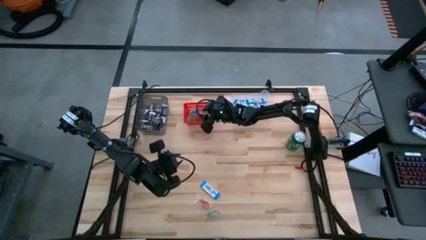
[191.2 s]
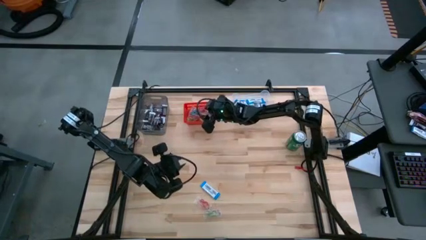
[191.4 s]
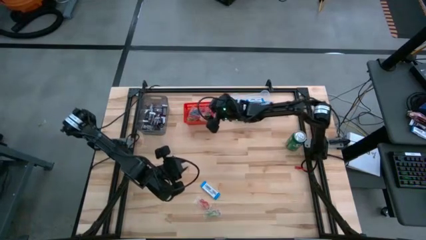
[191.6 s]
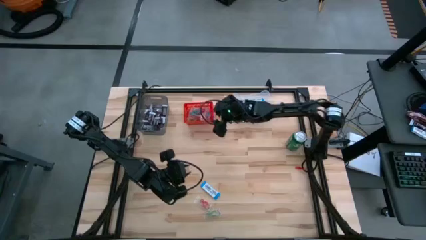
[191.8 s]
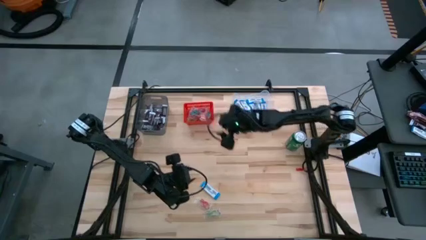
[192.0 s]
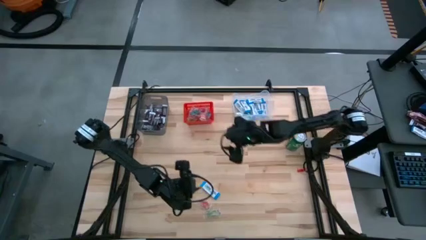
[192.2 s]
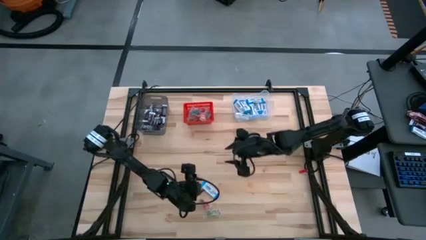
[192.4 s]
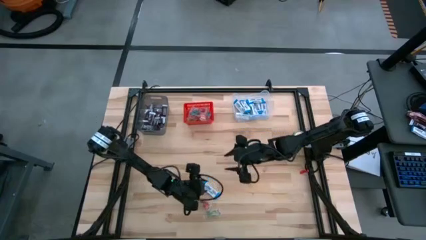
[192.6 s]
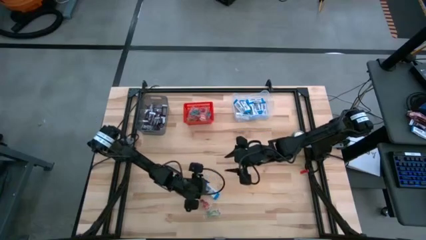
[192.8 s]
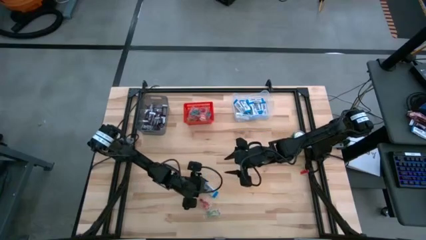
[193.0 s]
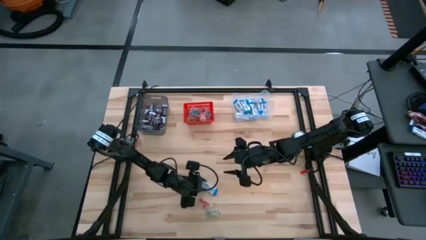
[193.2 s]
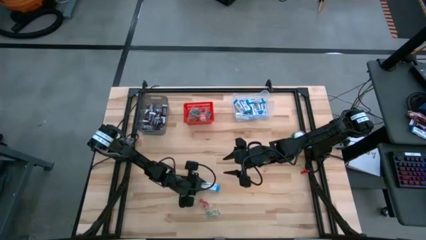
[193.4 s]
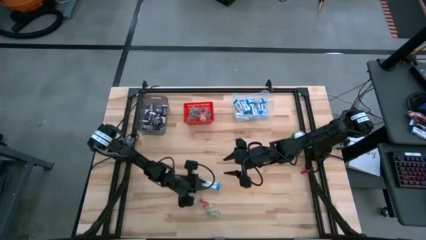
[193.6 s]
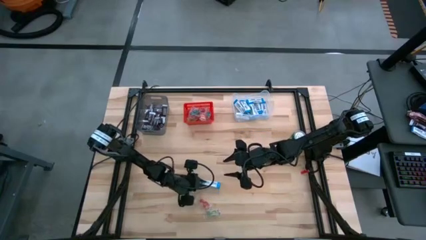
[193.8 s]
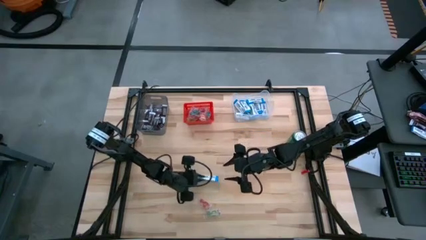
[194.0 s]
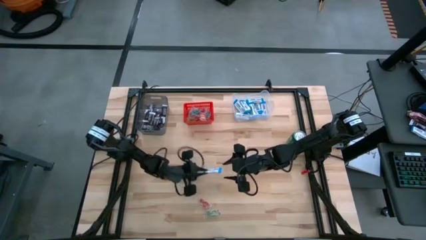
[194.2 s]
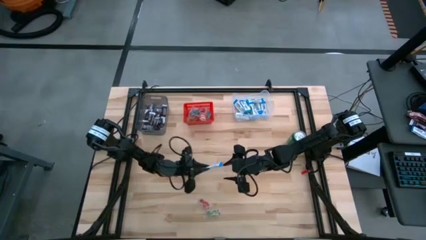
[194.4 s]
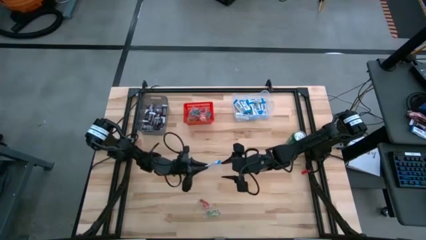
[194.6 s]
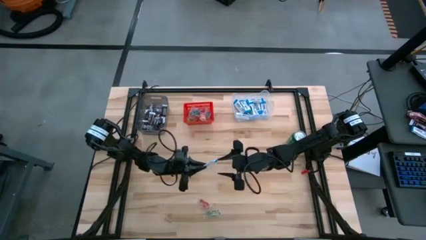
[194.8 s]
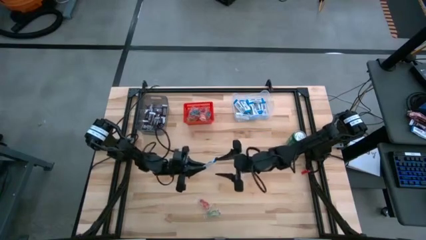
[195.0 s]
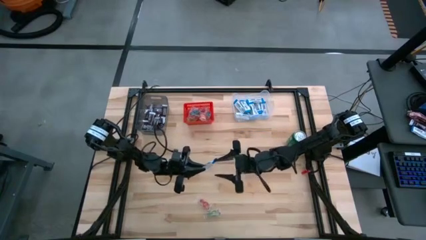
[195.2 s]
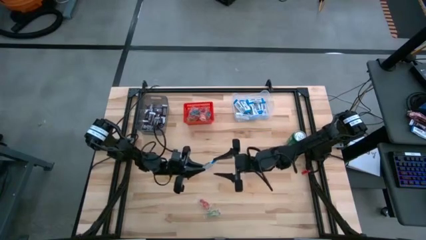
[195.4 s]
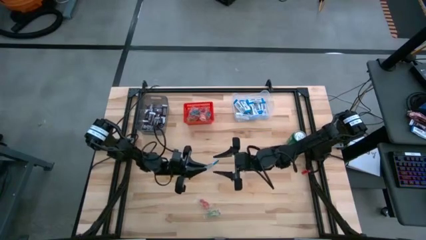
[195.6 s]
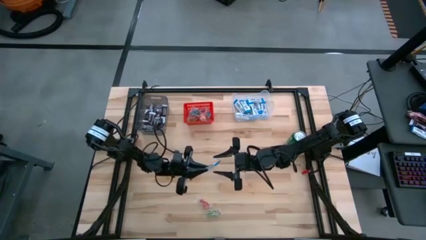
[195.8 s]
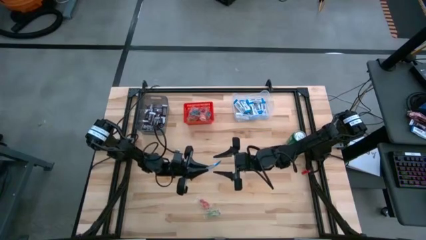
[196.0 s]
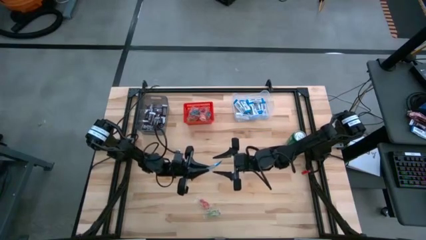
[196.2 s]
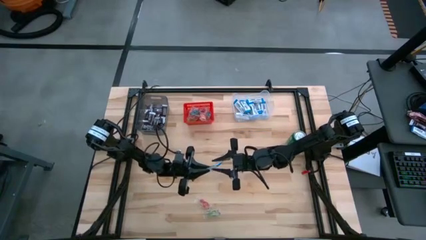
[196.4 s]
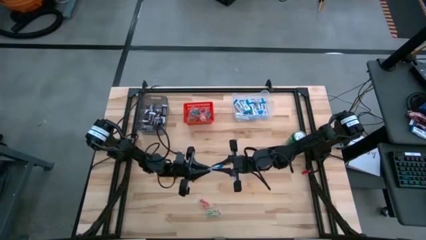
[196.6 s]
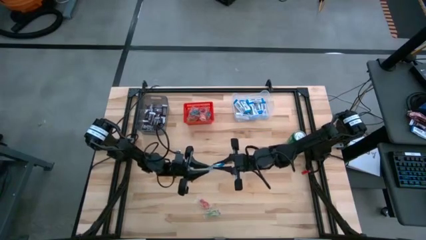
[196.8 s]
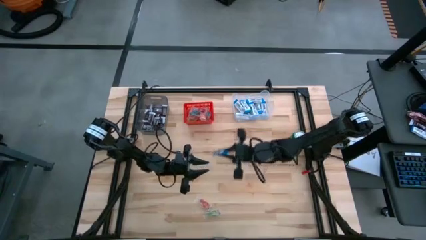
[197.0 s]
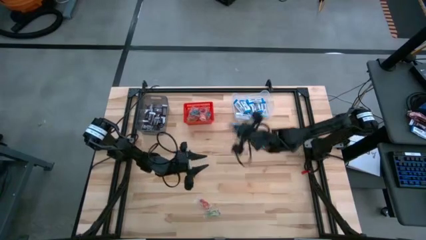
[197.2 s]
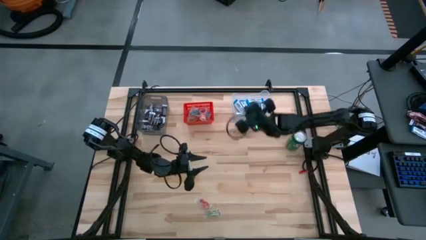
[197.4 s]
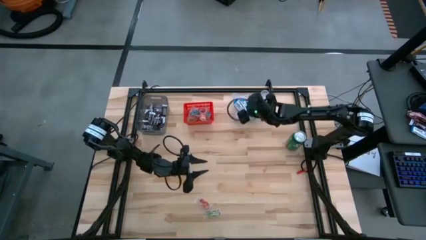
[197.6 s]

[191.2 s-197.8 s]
Task: Sort candy
Put the white chocolate into the transparent bin

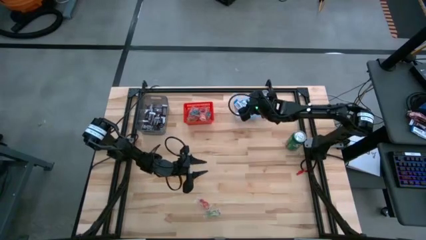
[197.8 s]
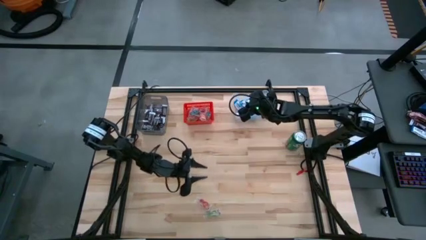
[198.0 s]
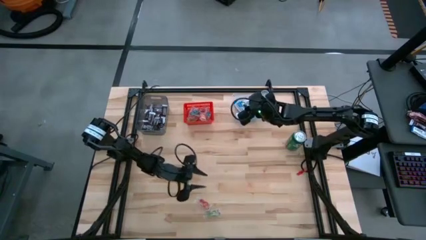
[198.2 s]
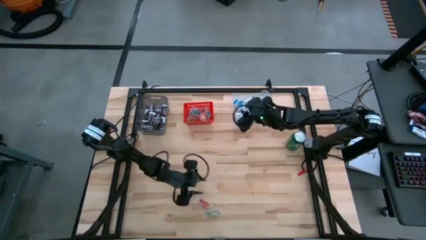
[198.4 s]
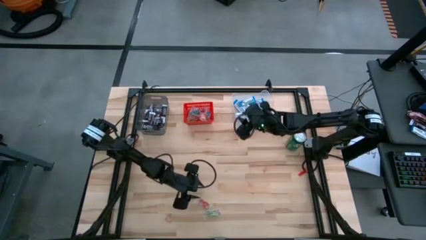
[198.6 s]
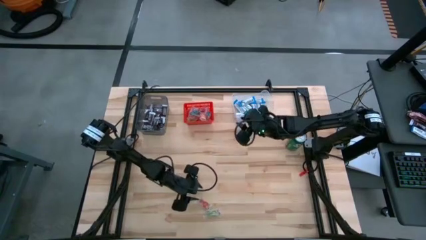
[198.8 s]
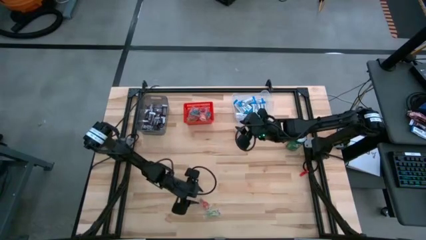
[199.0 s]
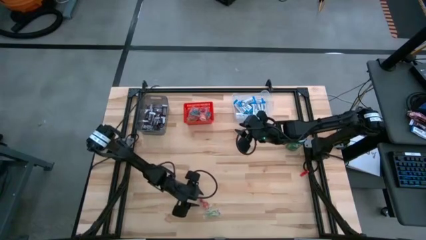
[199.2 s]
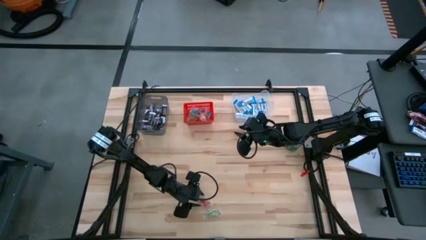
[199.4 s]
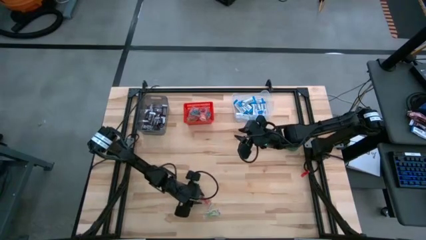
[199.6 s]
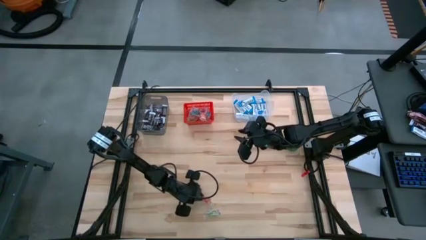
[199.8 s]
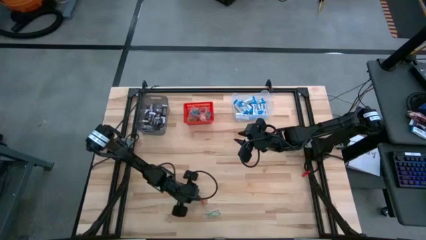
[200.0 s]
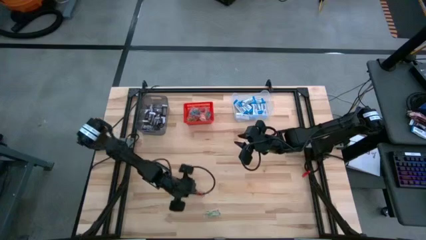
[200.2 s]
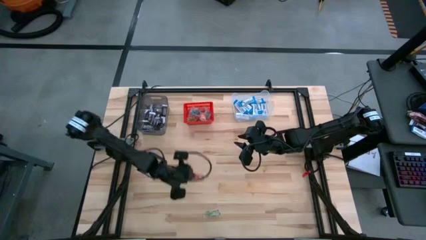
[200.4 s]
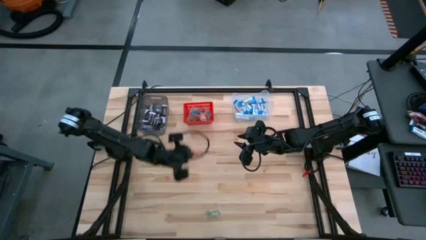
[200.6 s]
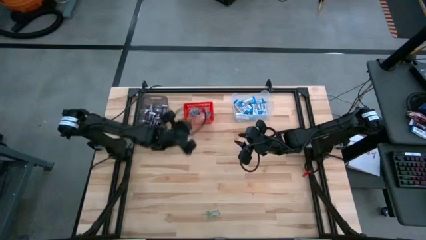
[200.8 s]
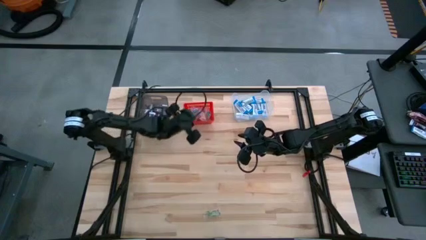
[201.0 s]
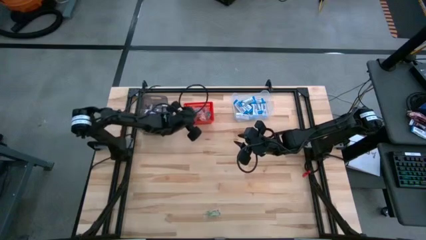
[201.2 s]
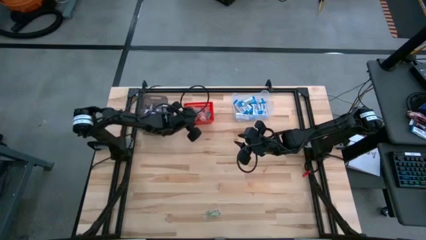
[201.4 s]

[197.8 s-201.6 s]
Put the orange gummy into the red bin

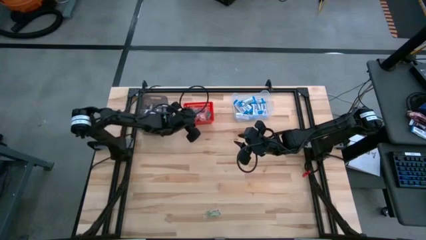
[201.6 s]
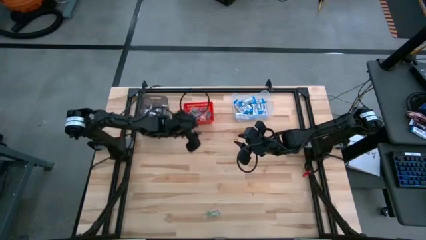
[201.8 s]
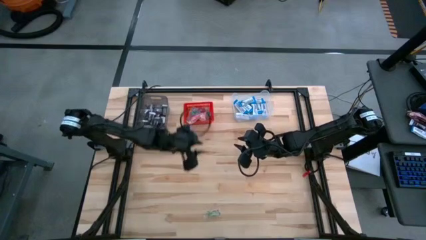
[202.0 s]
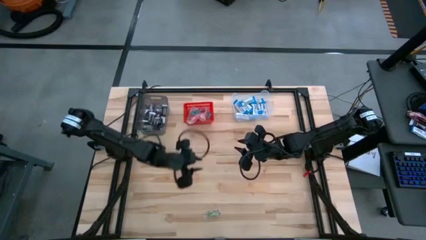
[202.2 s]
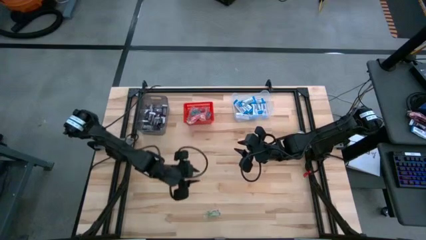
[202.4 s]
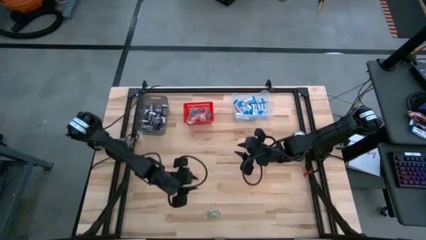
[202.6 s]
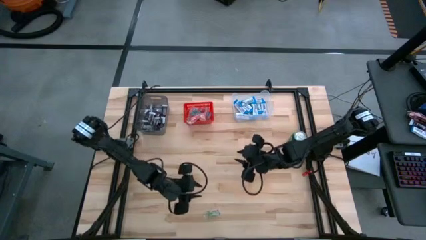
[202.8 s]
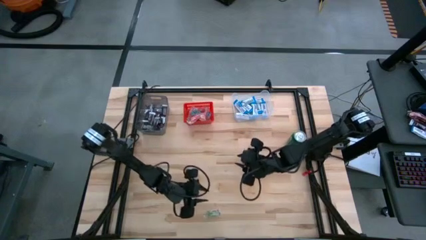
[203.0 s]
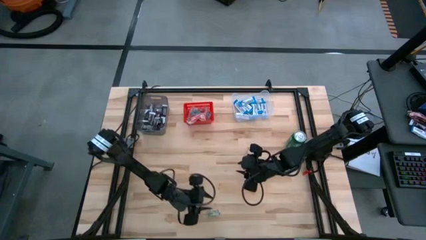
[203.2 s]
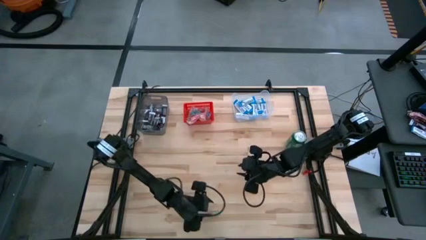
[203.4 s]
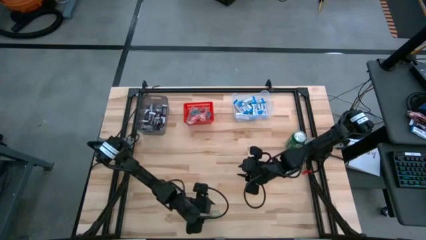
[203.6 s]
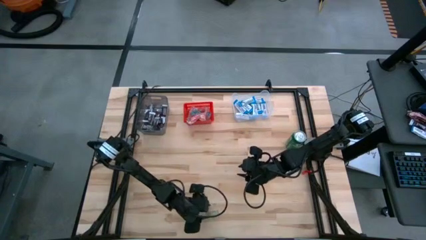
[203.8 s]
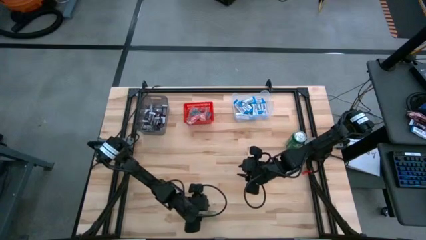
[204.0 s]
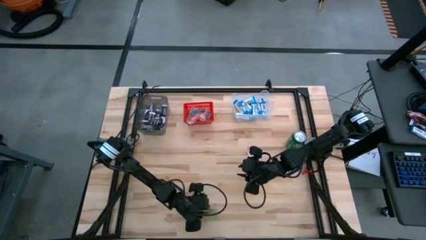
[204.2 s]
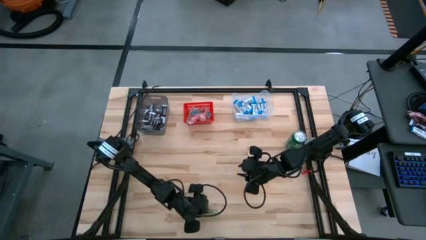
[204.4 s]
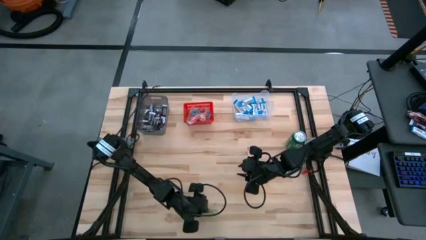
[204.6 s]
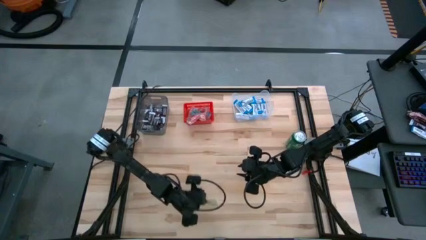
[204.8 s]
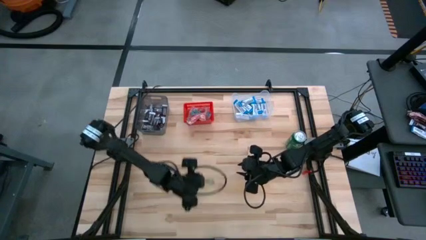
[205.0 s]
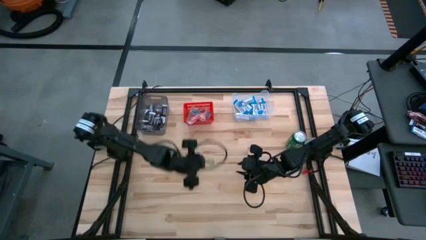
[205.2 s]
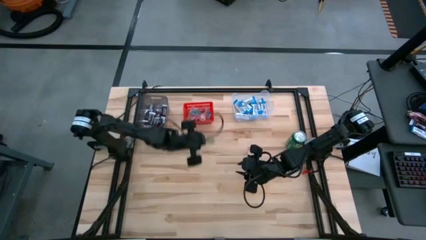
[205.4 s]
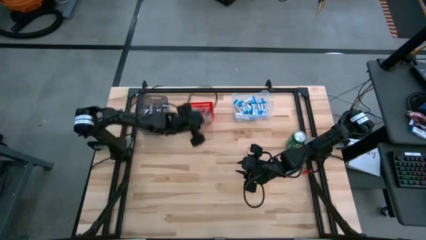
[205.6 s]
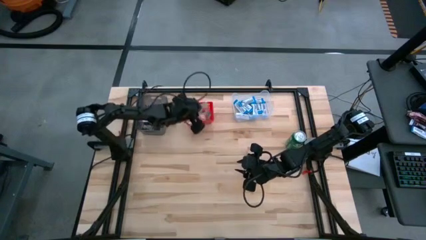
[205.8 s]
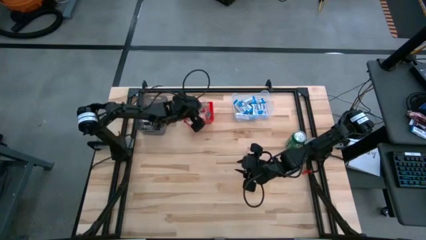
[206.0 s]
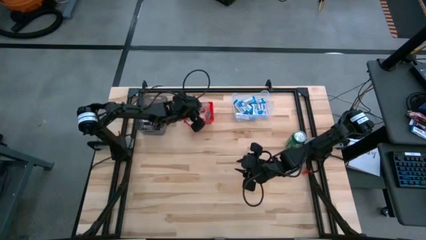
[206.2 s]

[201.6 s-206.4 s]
Put the green gummy into the red bin

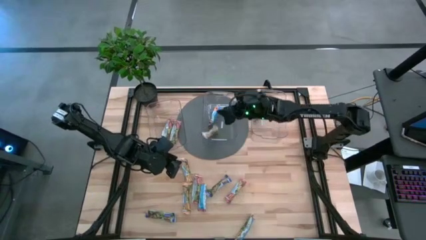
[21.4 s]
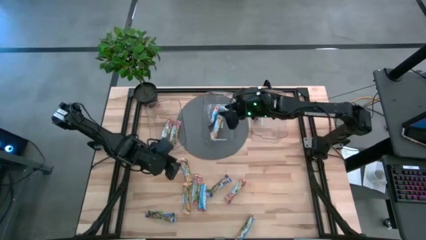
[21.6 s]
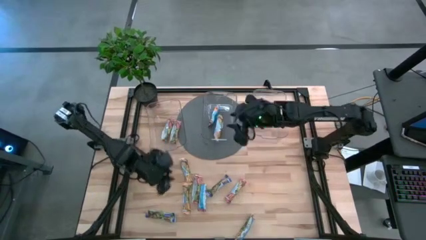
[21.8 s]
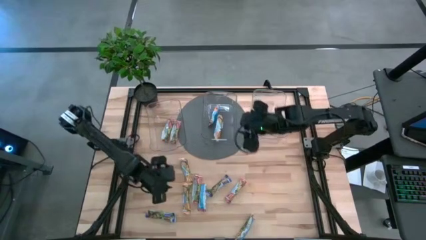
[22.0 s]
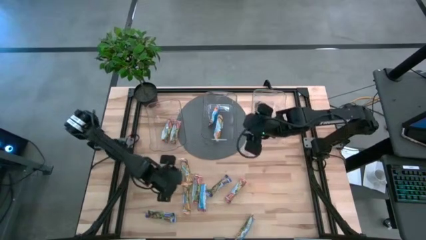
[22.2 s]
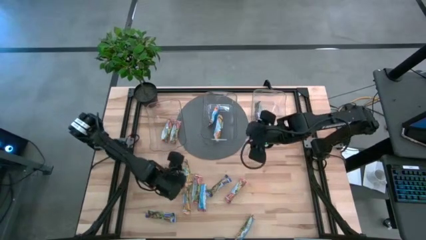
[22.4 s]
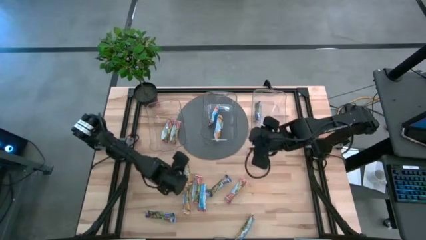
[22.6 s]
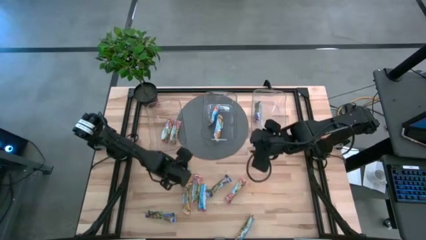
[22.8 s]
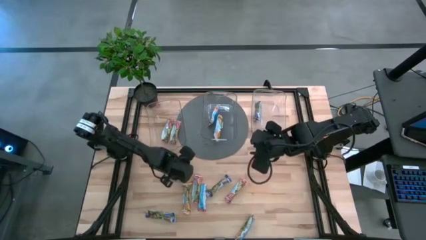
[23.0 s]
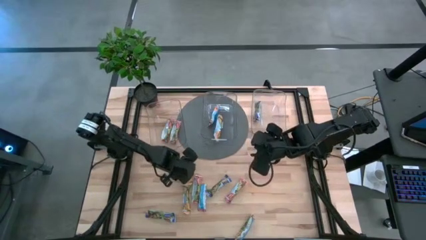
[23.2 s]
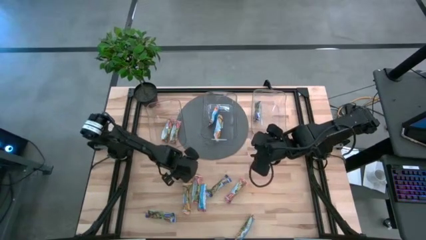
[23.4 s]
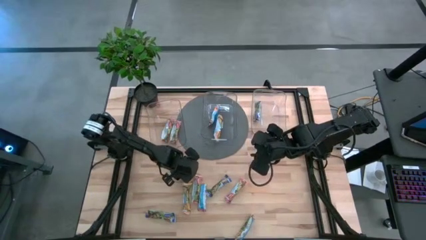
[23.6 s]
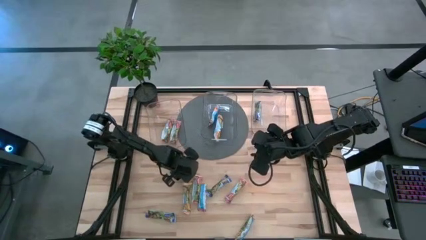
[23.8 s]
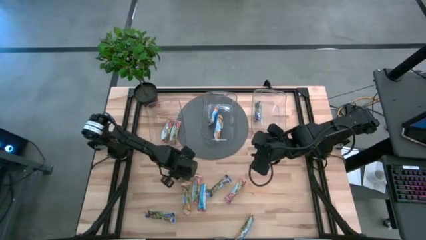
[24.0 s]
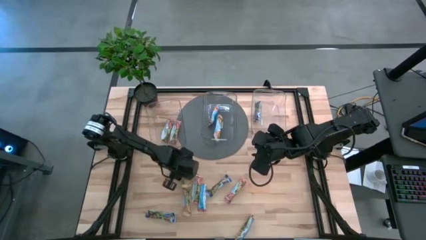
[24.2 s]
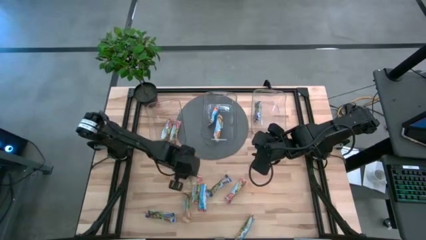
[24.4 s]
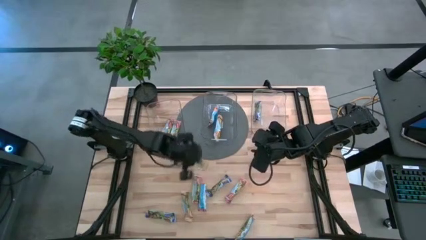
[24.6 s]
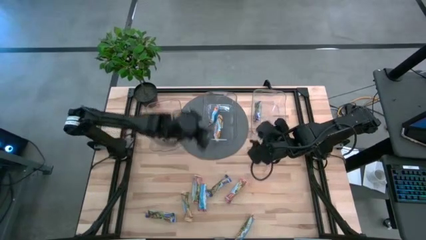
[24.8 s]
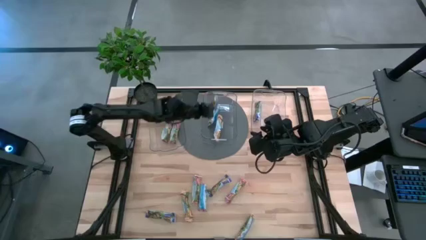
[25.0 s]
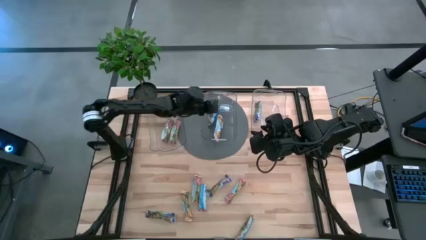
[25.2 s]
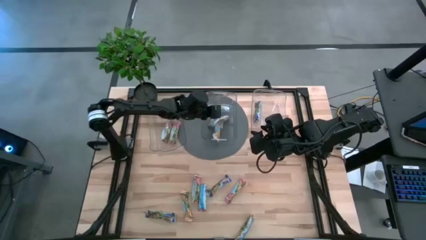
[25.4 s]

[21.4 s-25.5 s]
Task: Pick and place Granola Bars by type
Put the yellow granola bar into the center transparent bin
